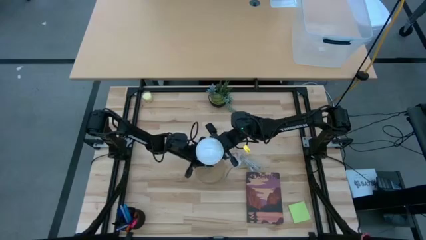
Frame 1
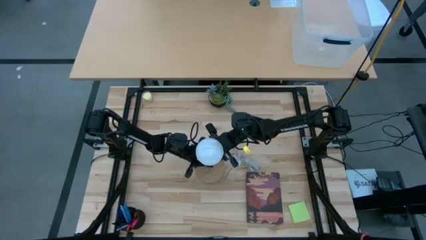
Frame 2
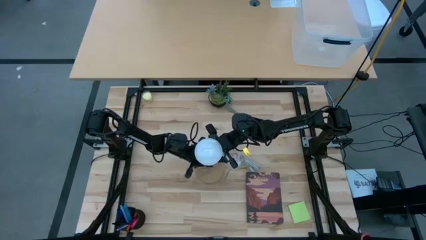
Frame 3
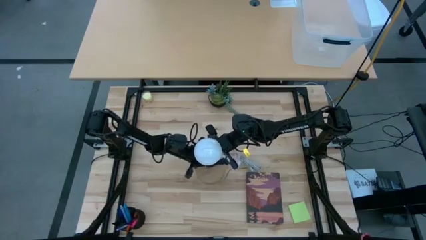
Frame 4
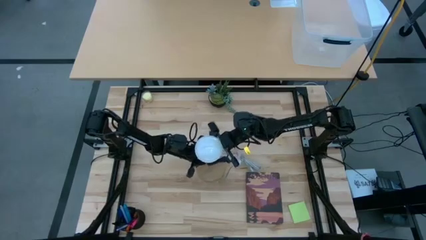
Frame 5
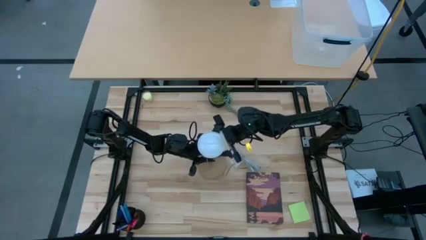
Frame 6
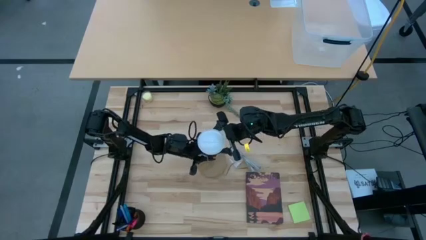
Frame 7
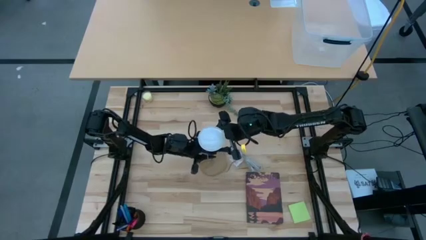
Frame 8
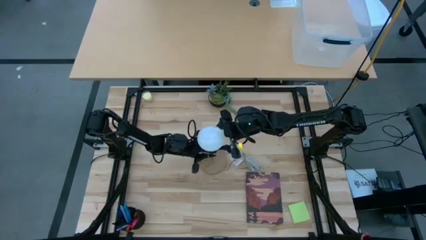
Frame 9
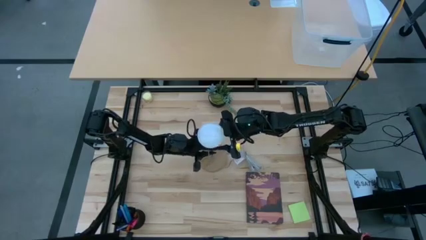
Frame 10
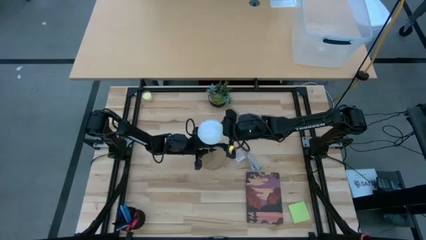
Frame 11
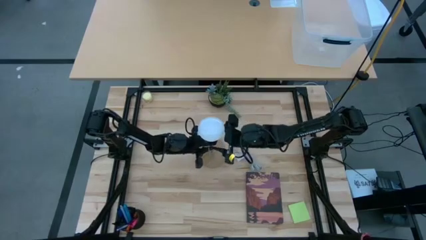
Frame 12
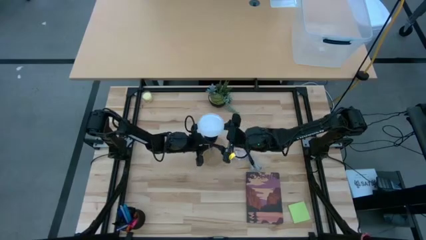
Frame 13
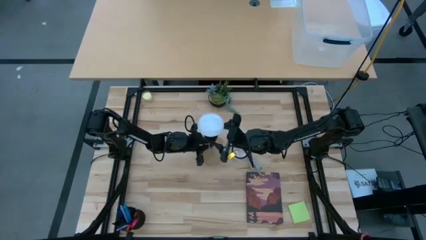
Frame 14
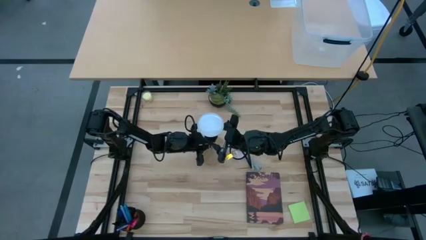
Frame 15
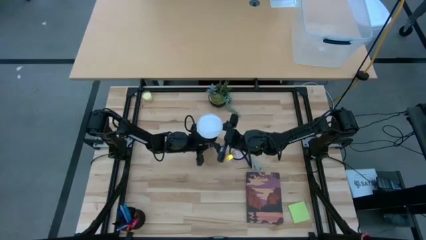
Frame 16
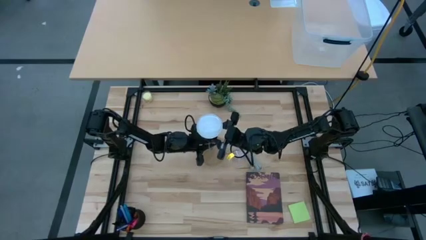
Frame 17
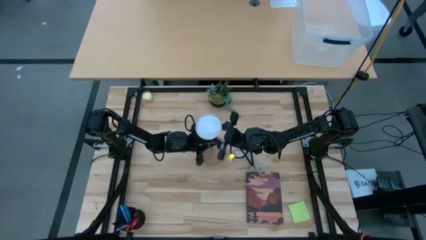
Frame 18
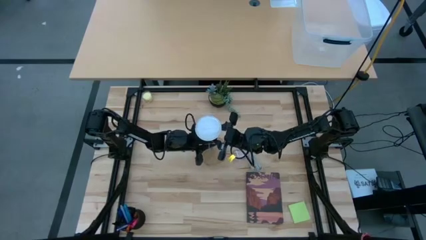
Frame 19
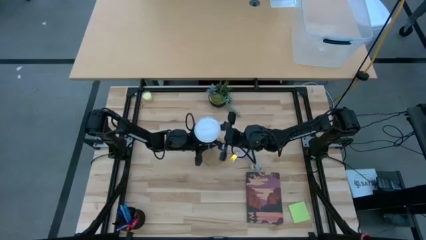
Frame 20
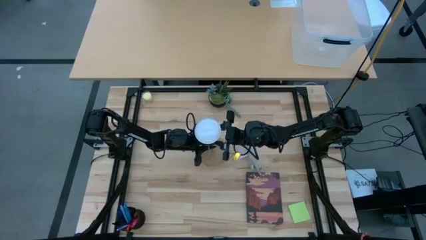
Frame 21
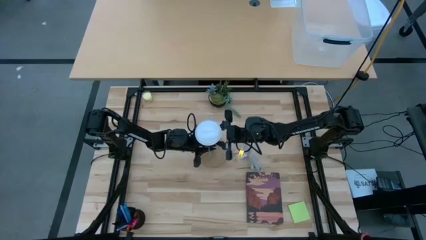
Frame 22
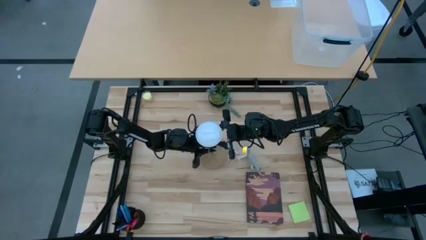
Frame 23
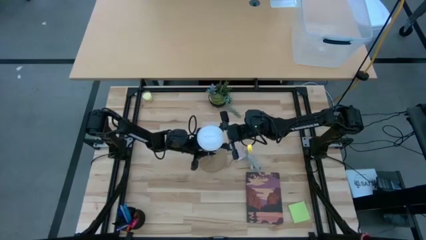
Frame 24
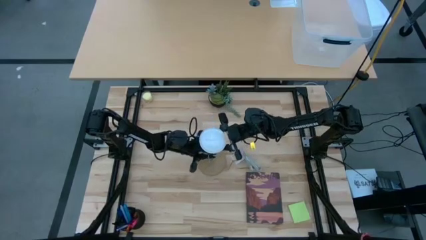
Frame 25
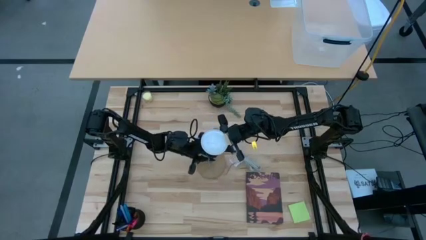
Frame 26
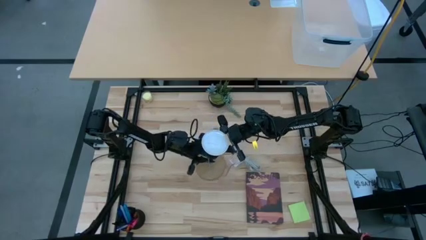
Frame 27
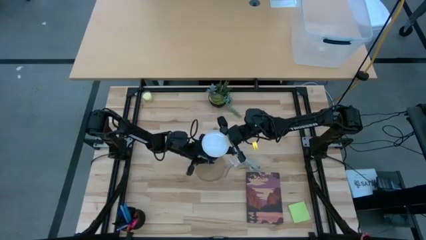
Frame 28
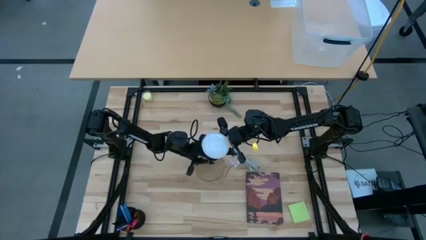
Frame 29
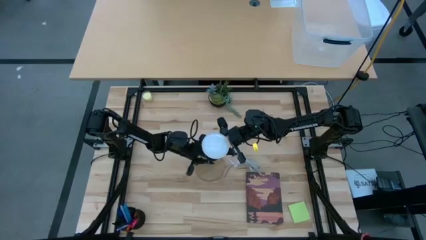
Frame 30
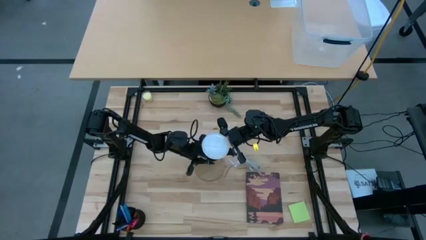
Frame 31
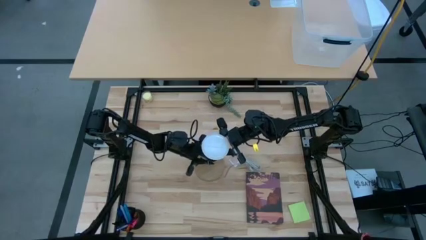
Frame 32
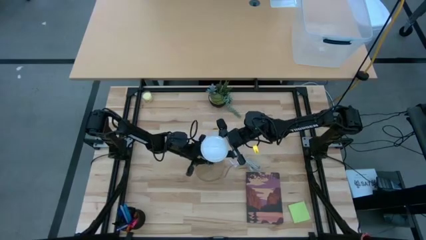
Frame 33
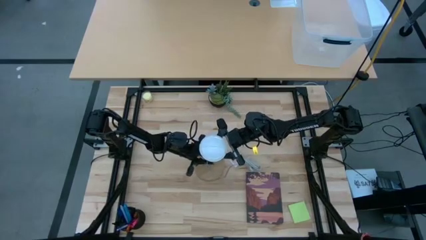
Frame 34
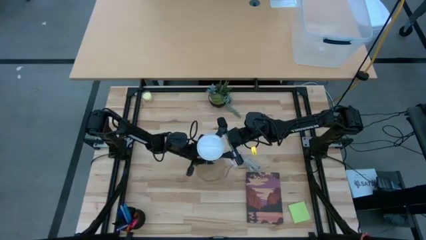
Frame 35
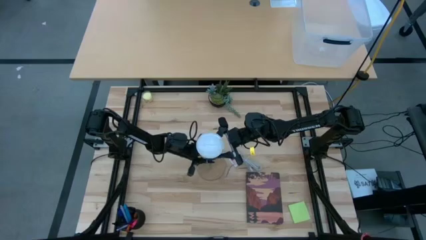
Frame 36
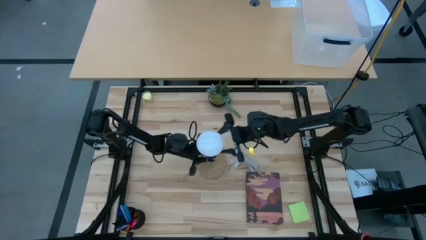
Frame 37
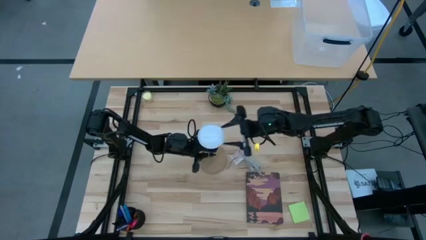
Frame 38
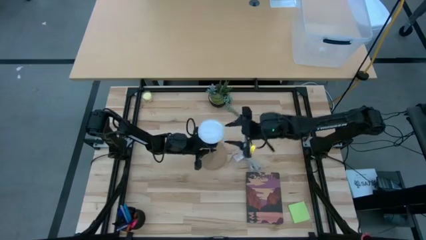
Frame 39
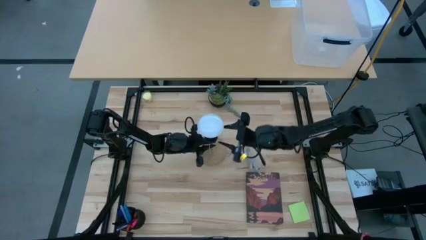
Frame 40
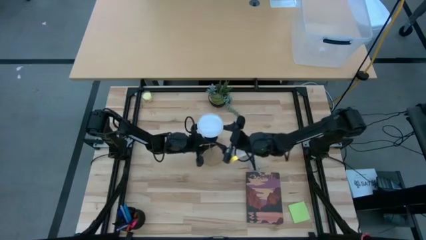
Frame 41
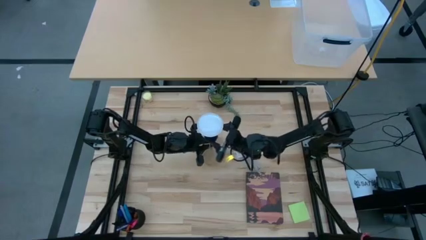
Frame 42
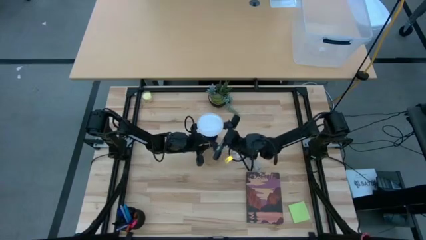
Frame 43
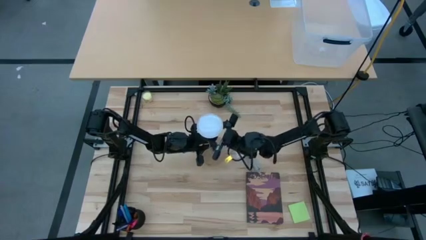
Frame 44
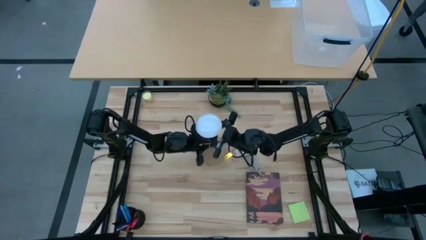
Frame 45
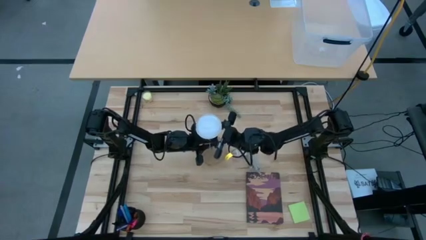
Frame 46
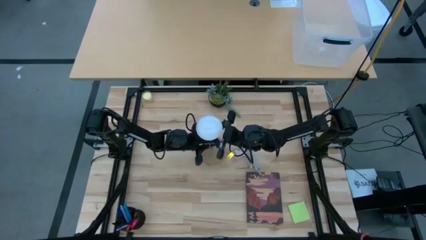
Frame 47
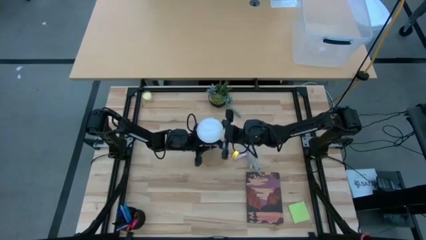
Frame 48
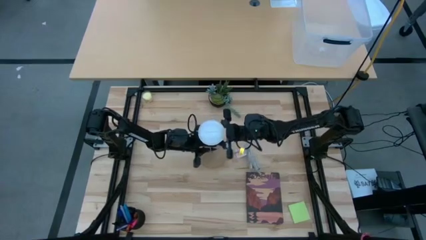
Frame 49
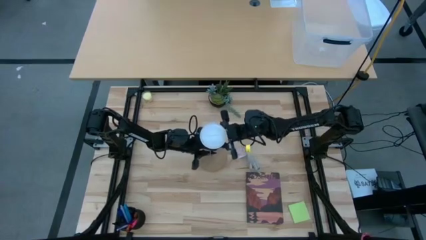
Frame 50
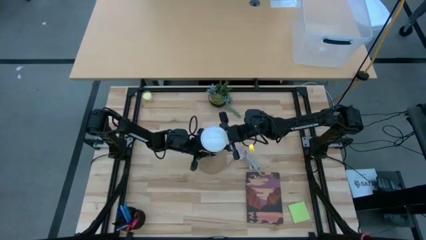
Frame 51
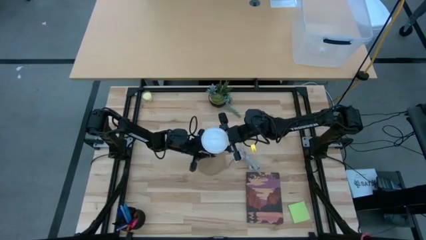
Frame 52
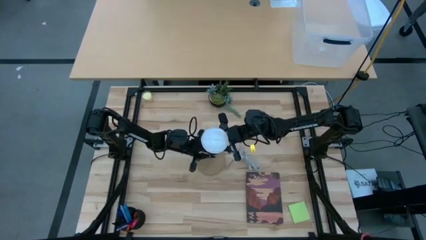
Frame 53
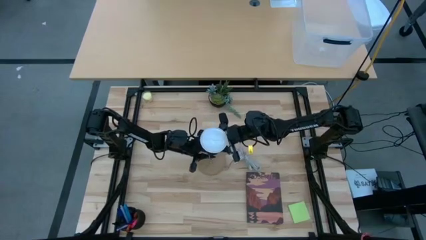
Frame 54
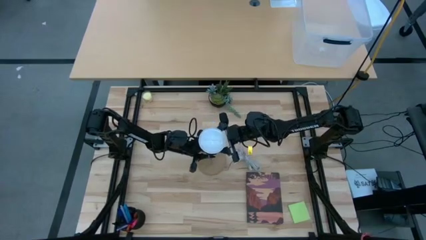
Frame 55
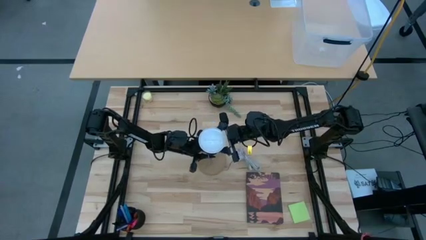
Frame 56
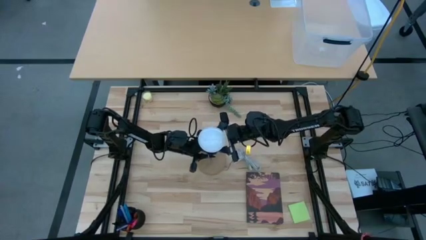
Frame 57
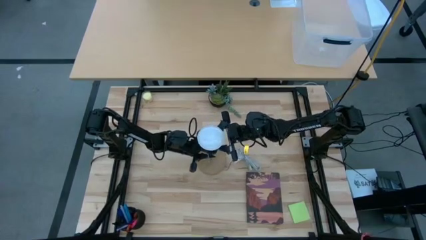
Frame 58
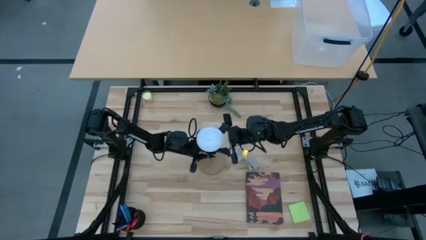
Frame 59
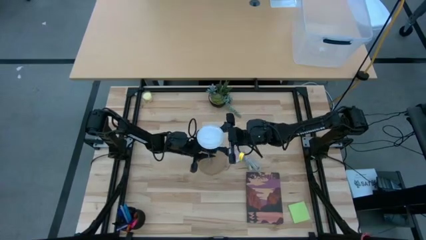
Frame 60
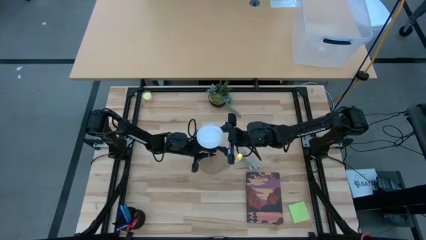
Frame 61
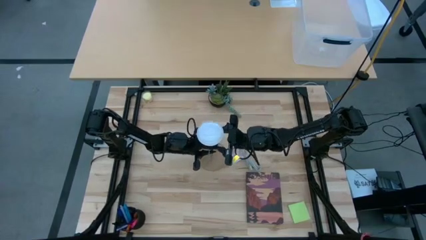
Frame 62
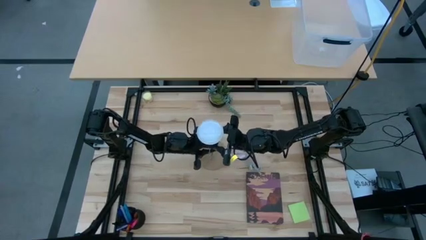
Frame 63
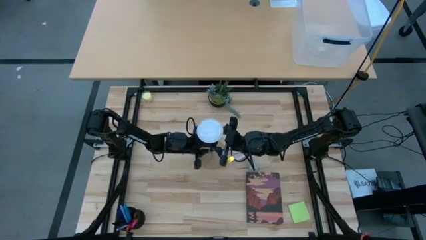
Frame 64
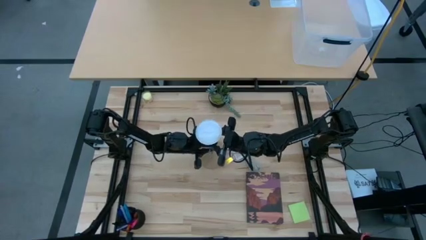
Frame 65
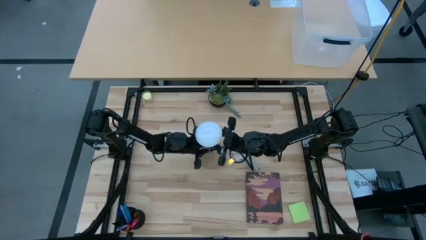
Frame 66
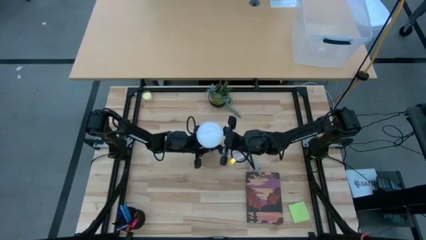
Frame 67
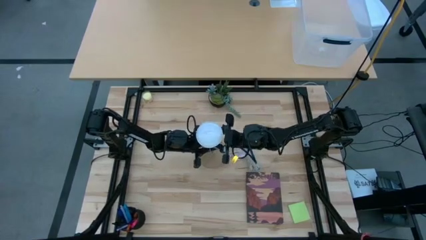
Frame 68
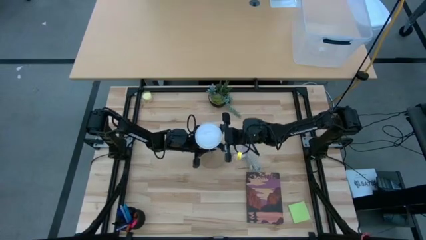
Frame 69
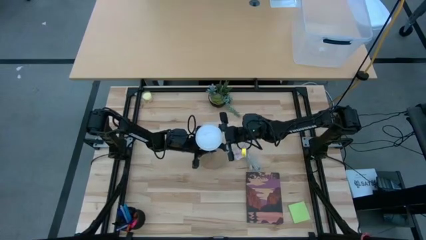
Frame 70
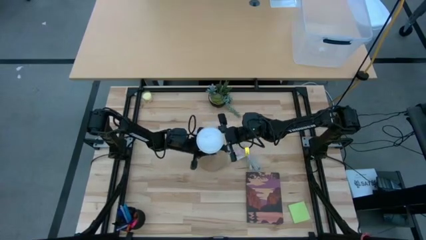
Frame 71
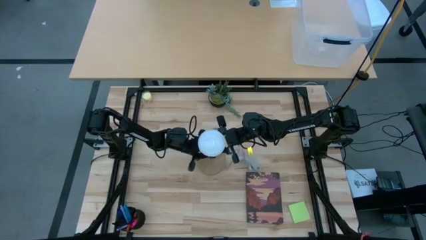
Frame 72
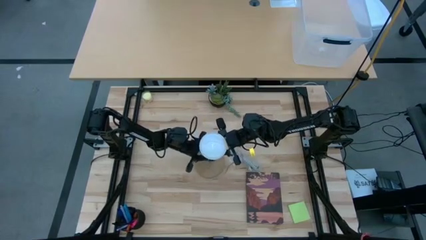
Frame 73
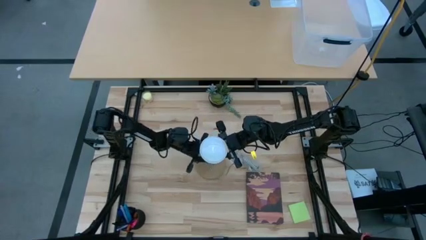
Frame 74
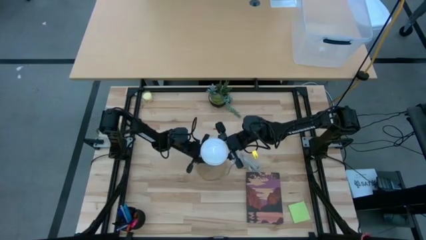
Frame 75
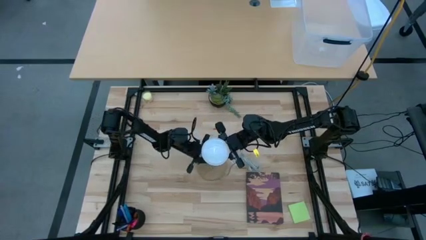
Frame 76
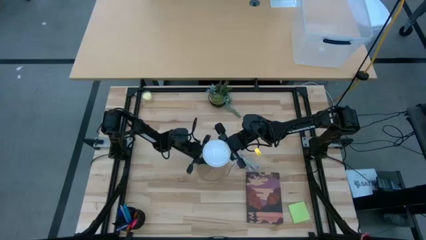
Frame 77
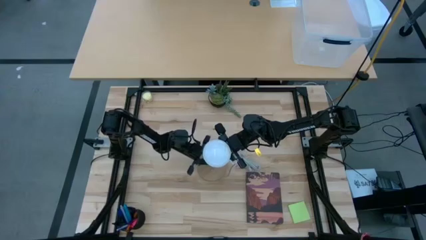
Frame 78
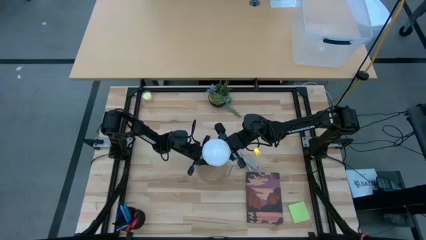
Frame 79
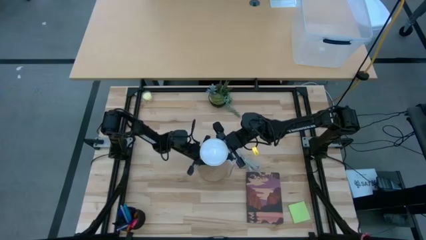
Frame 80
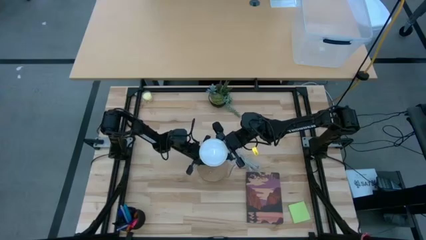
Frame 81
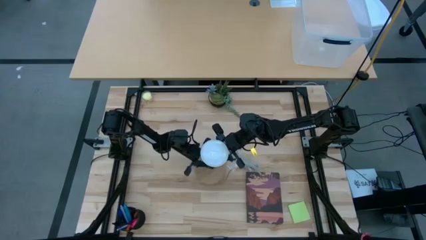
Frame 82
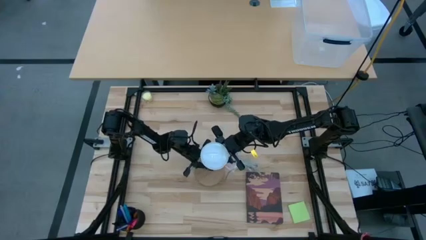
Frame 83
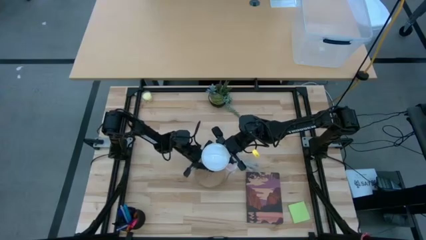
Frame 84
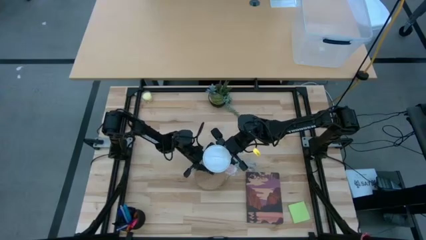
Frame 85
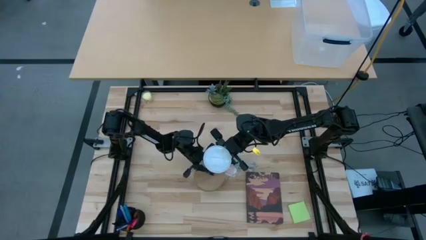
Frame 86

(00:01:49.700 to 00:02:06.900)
Task: Screw lightbulb
Remove the white lightbulb from the silver lamp
